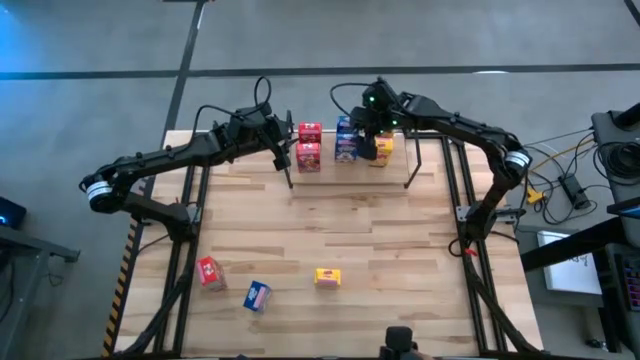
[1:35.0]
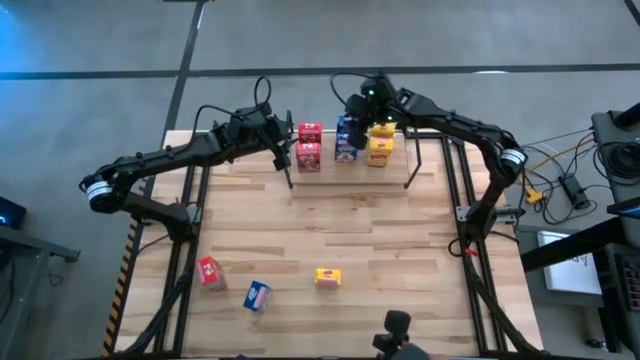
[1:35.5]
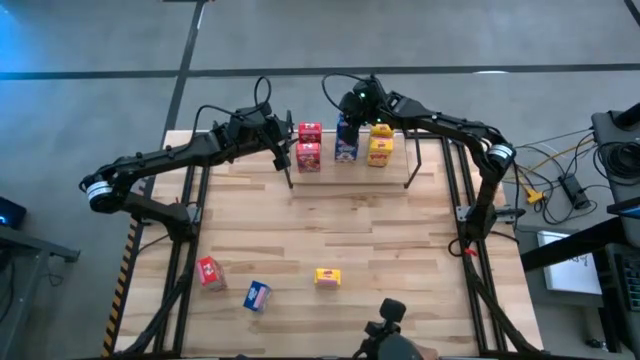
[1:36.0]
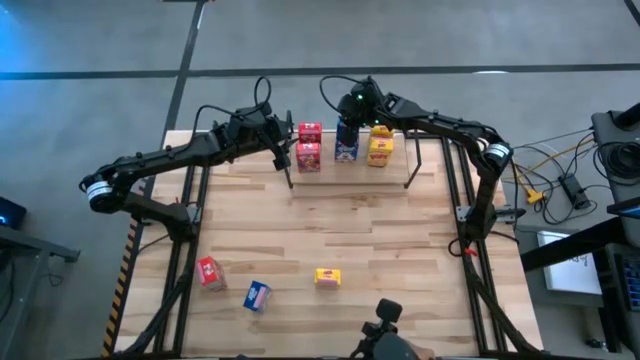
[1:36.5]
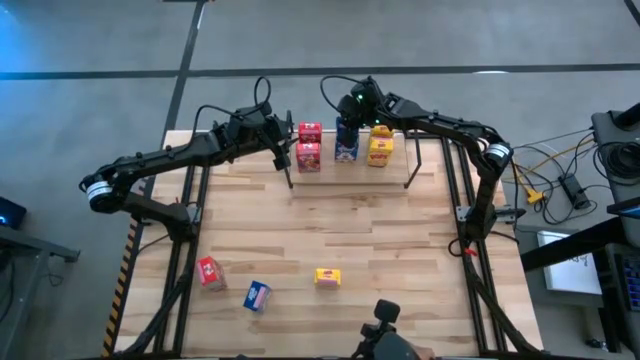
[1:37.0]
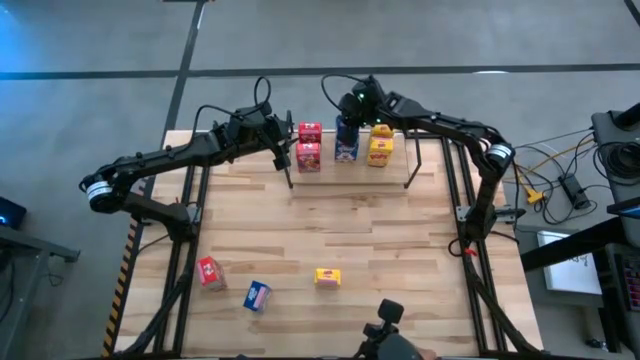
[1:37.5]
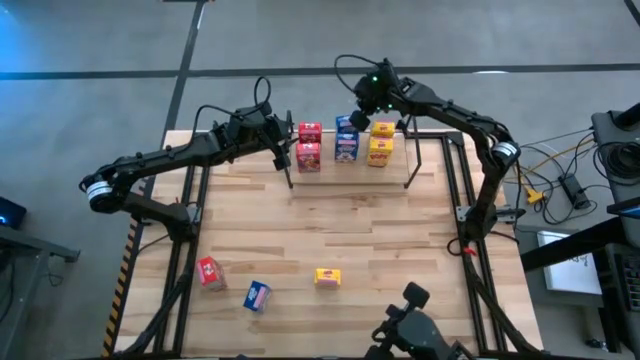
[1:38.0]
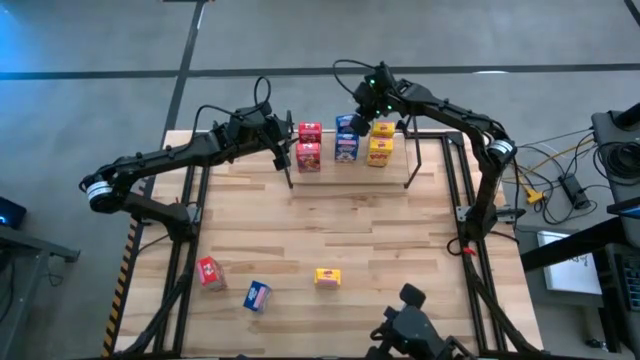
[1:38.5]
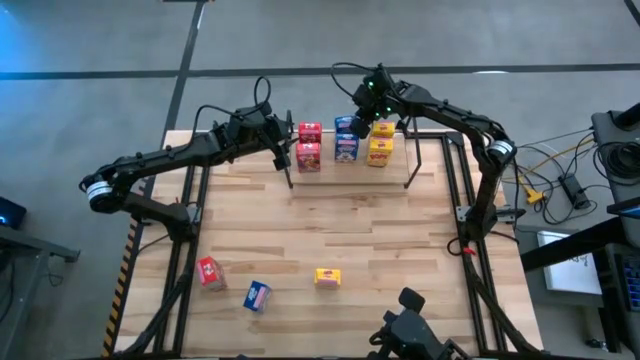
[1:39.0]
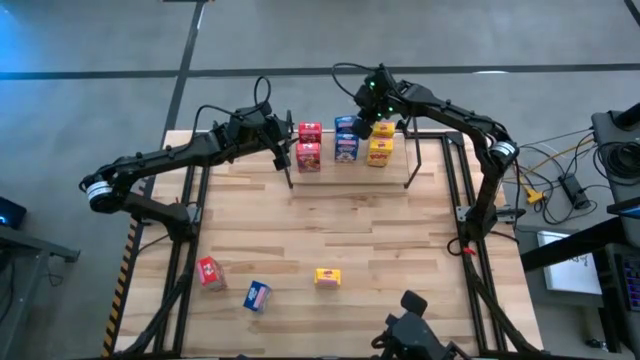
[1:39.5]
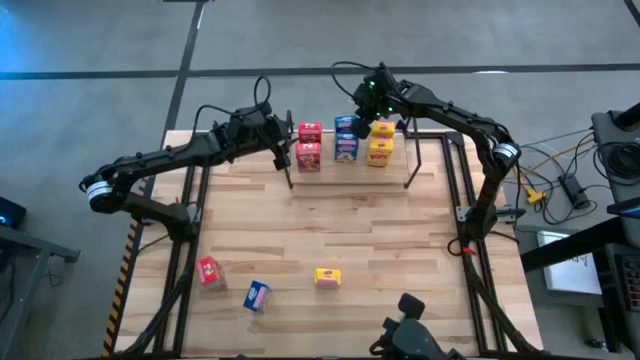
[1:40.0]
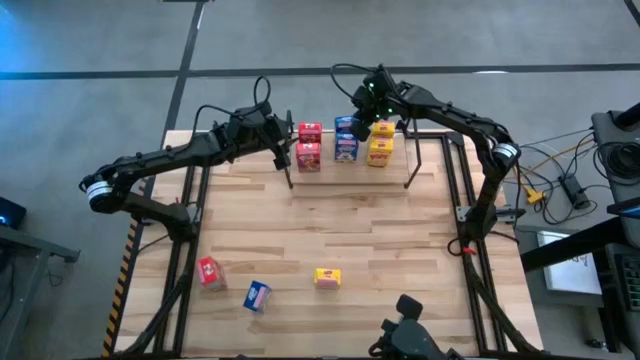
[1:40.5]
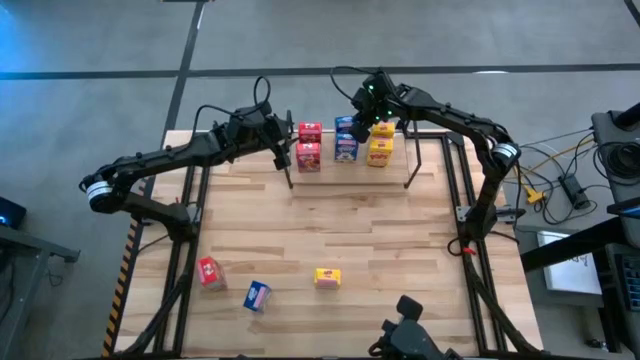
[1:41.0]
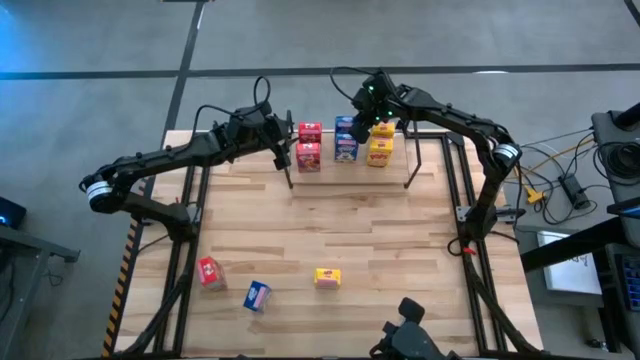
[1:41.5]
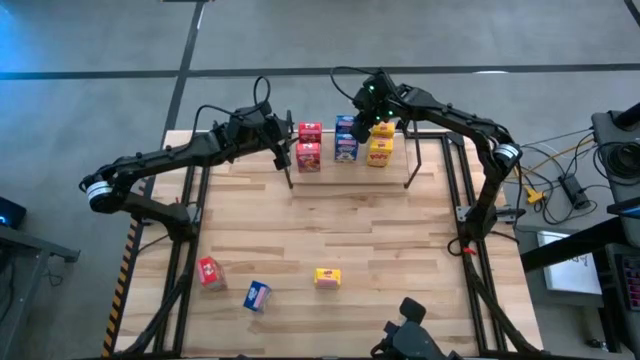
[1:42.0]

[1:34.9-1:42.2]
Task: Stack cereal on shelf
Adjust the top blue cereal box on the shelf

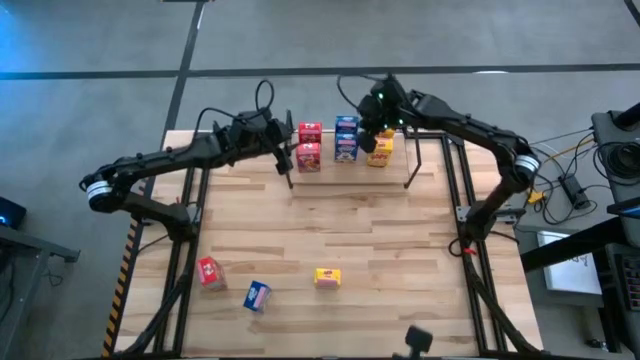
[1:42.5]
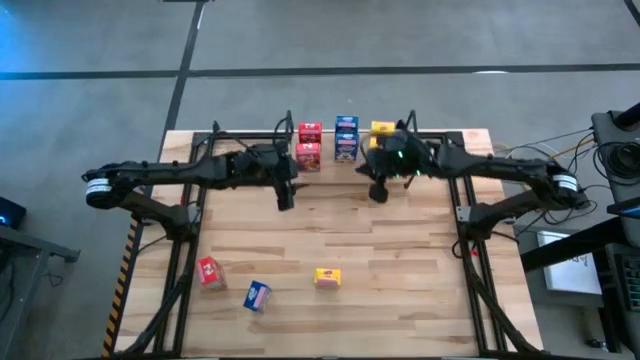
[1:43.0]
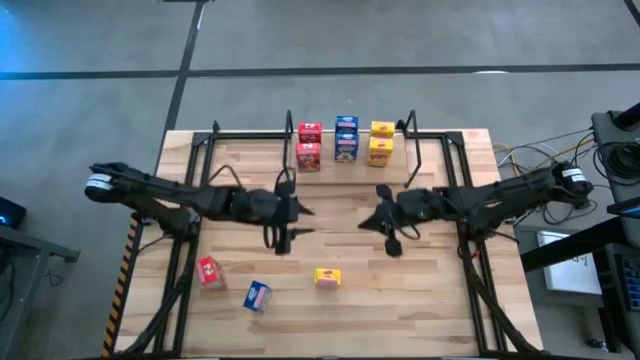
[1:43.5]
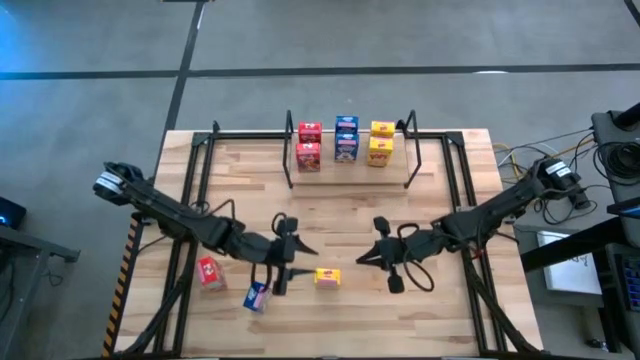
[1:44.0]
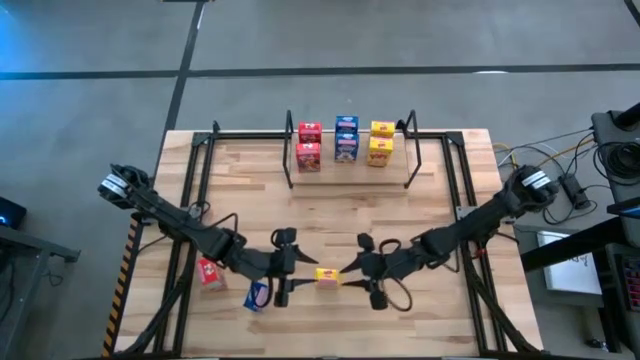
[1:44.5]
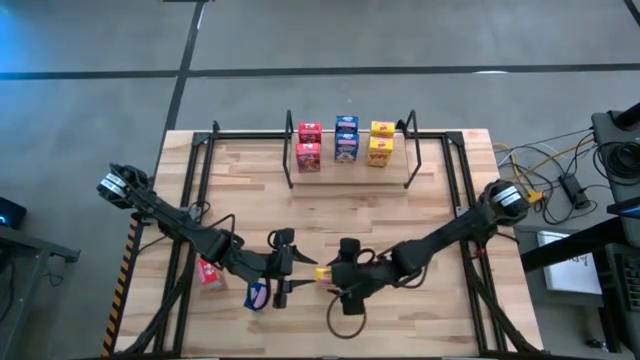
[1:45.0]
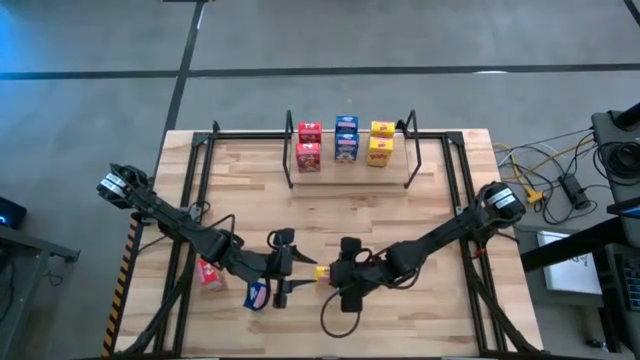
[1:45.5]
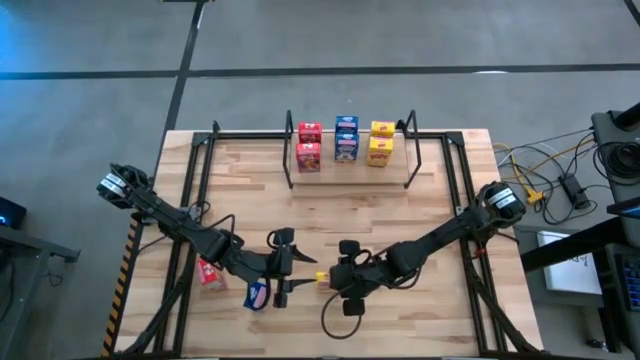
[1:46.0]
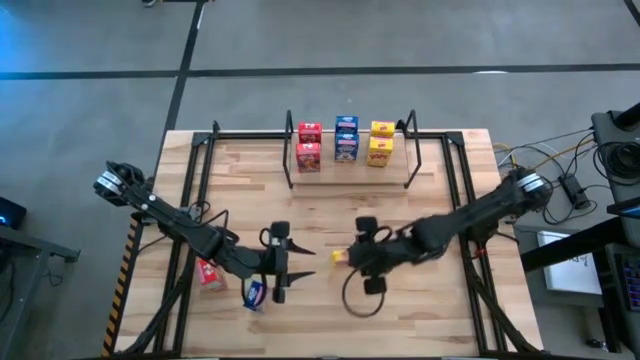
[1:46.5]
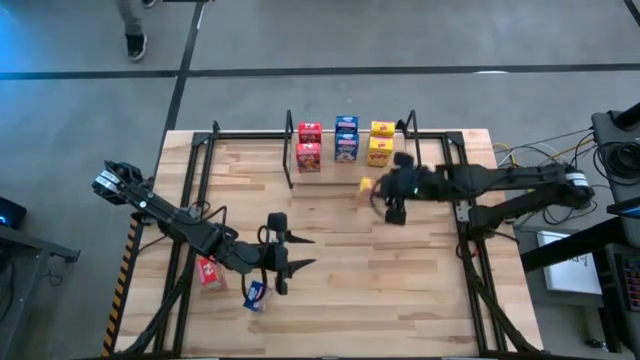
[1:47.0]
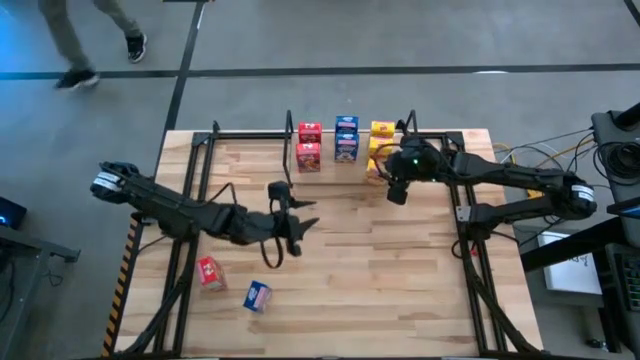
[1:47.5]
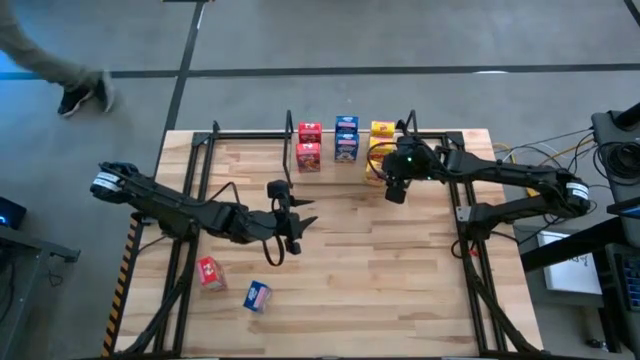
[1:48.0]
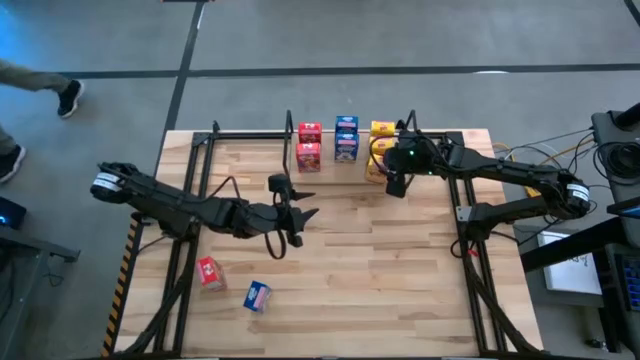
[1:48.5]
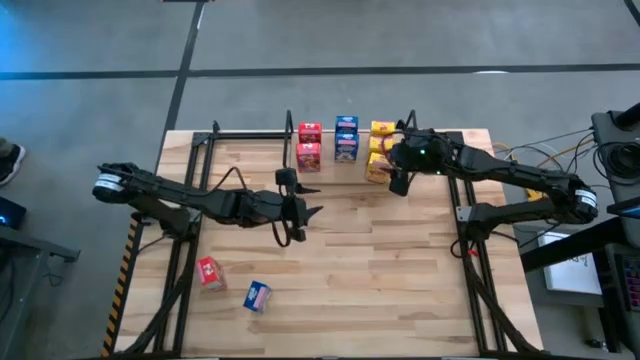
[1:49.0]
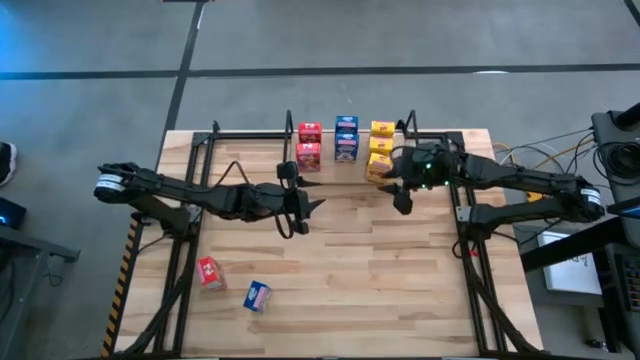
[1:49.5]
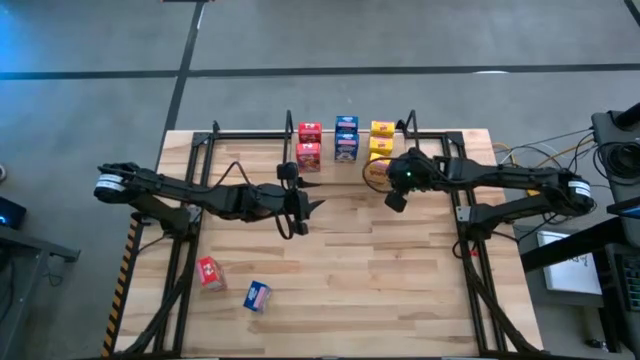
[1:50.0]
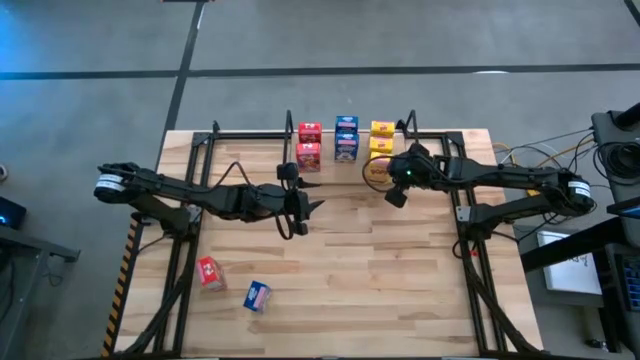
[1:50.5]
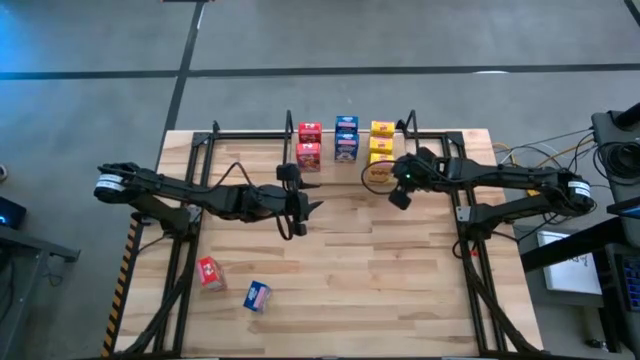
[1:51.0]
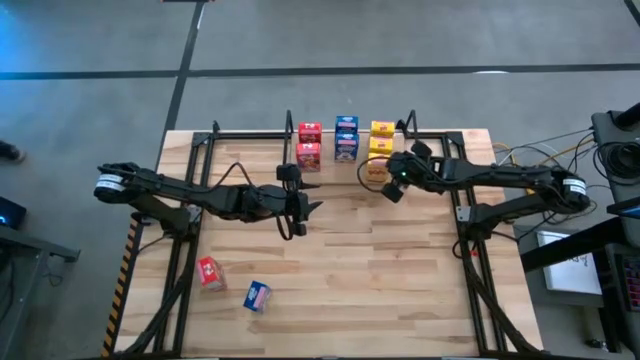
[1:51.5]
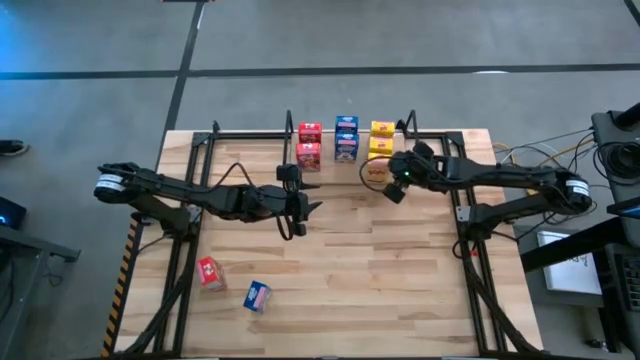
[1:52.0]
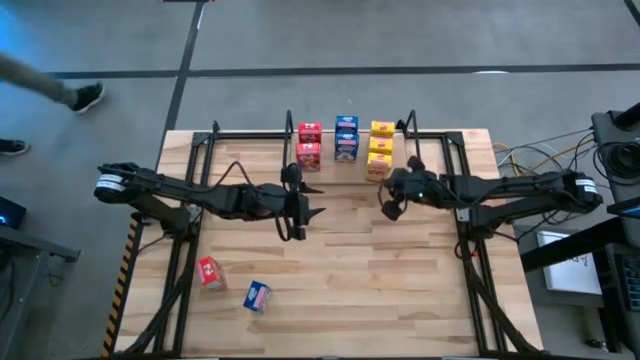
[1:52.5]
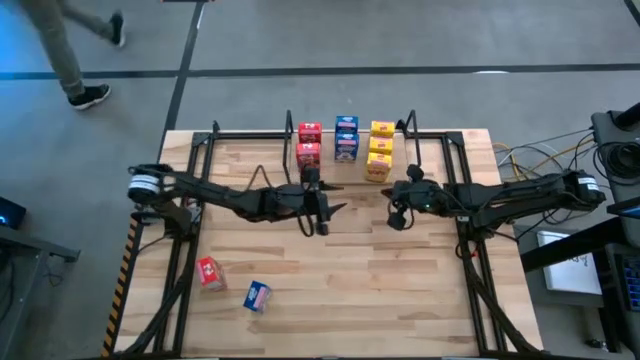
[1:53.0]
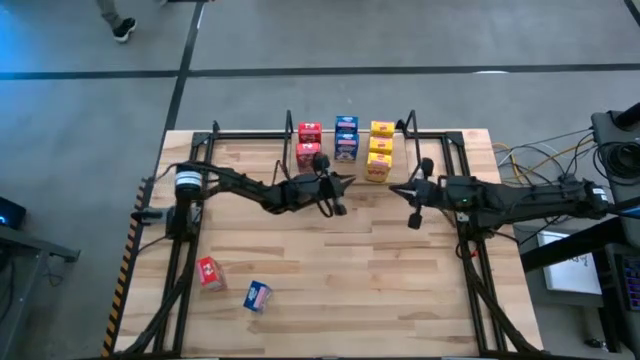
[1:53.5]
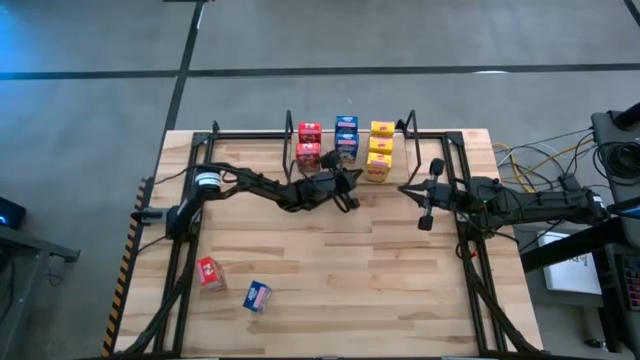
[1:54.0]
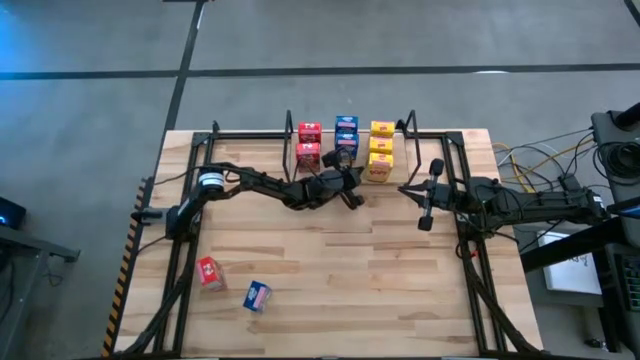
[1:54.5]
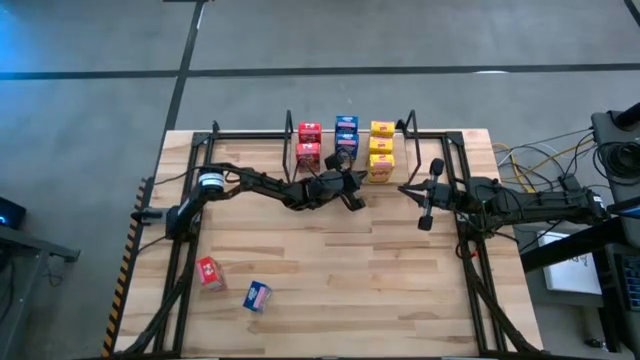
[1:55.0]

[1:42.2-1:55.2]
Put the yellow cereal box on the shelf aligned with the other yellow cereal boxes

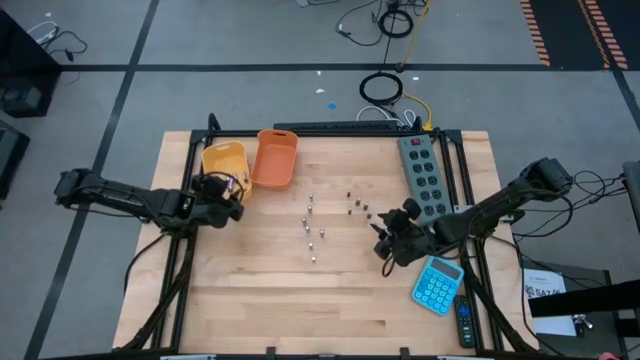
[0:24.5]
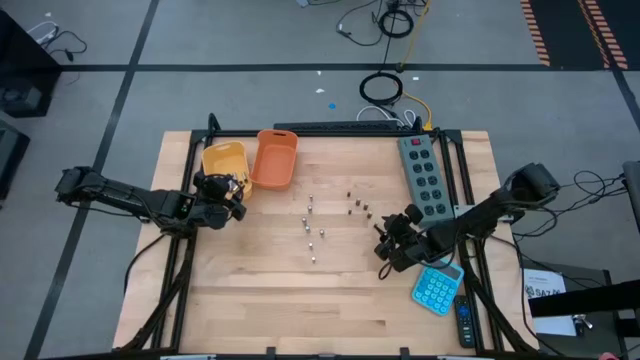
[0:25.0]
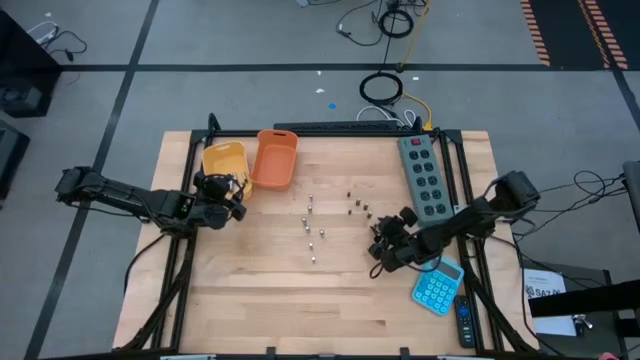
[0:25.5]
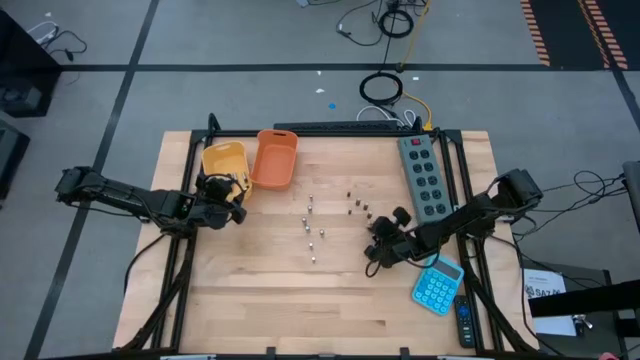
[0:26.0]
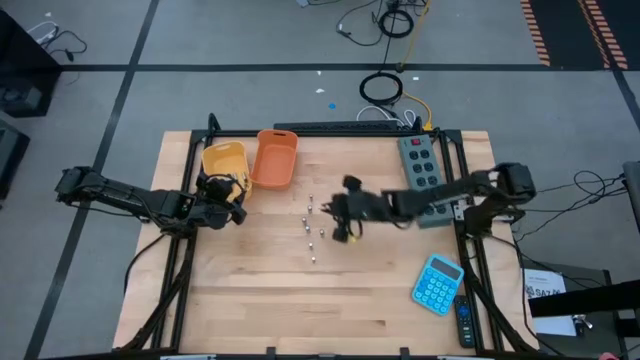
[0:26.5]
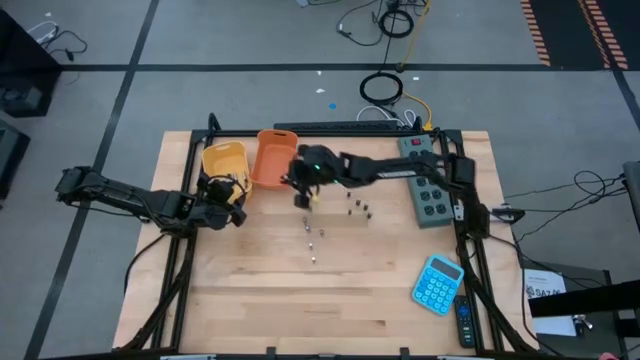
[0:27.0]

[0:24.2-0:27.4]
Task: Sort batteries
Put the black battery into the orange bin
